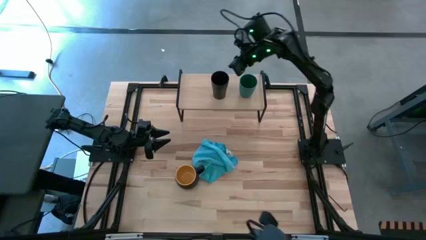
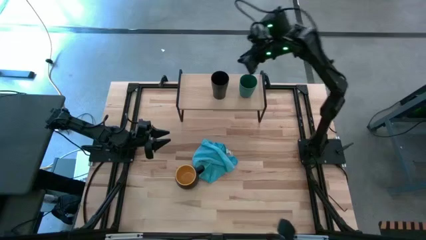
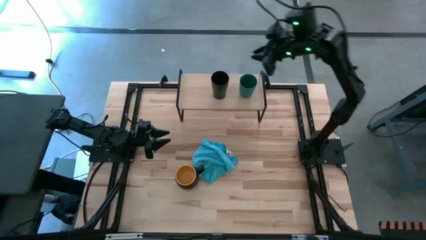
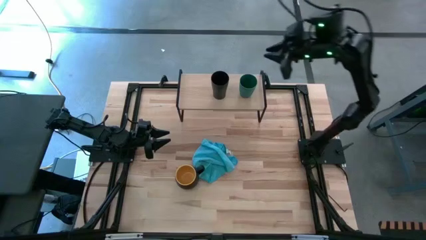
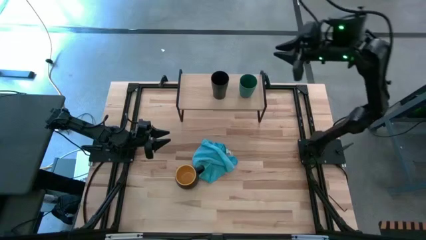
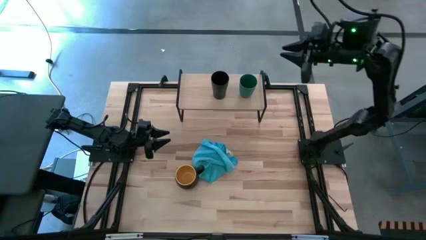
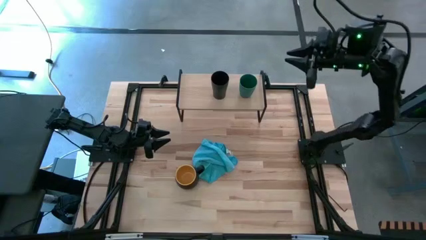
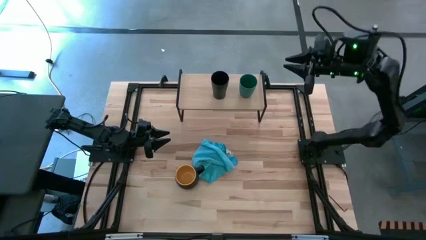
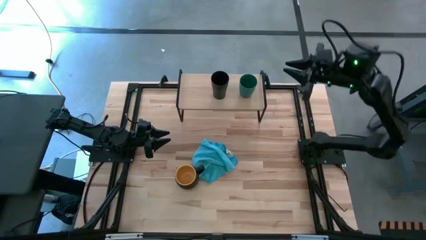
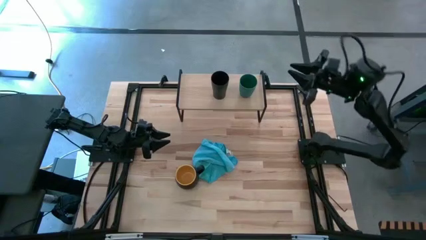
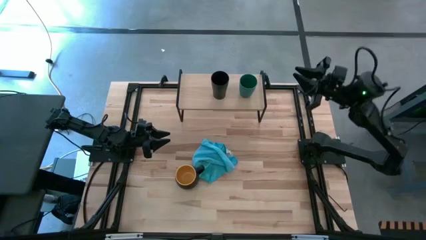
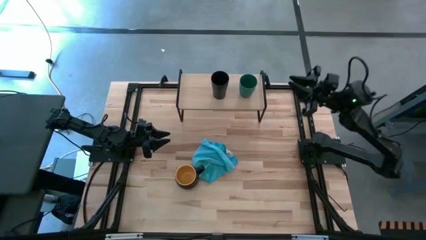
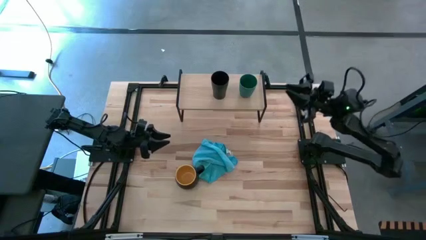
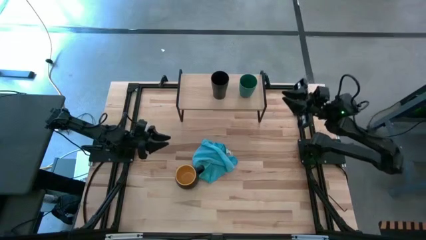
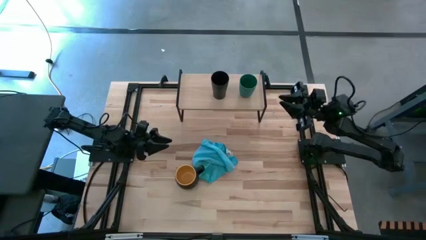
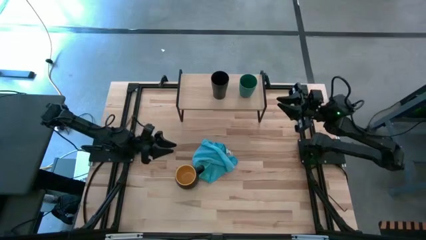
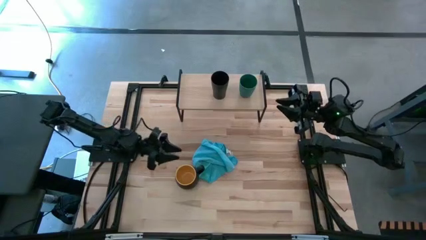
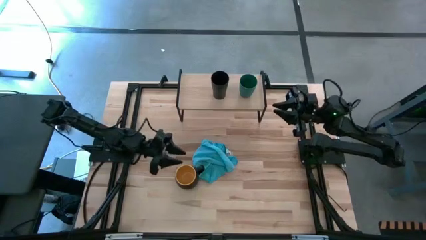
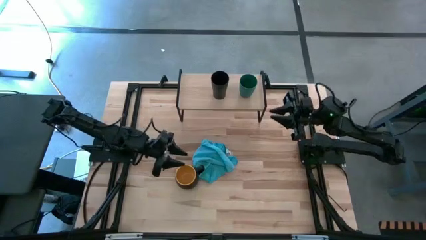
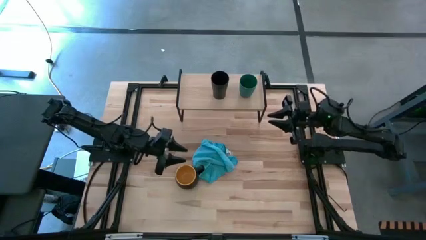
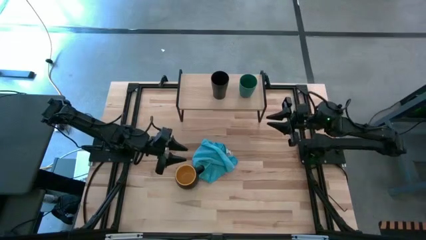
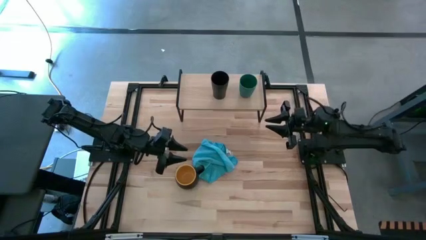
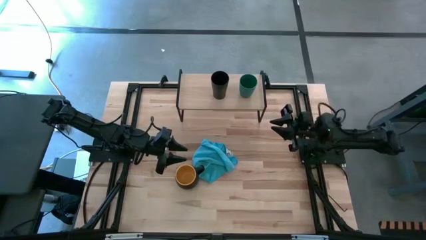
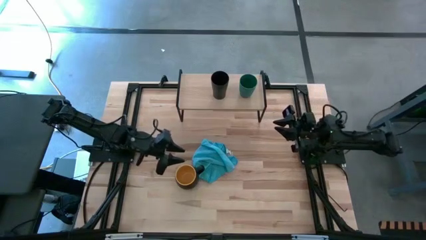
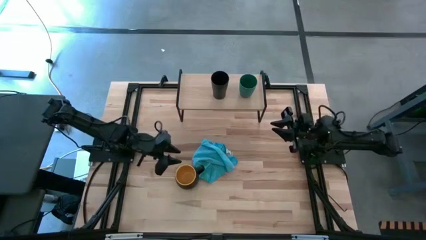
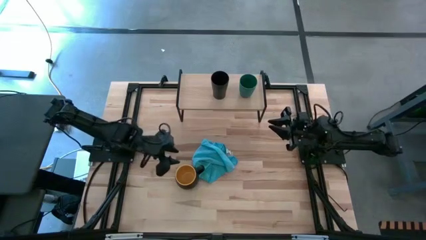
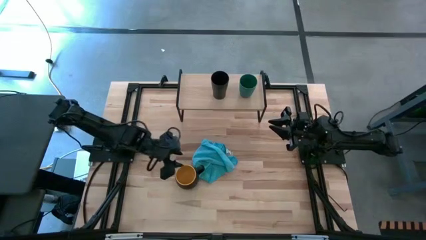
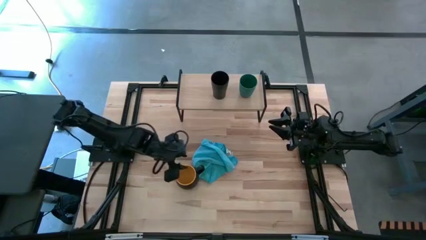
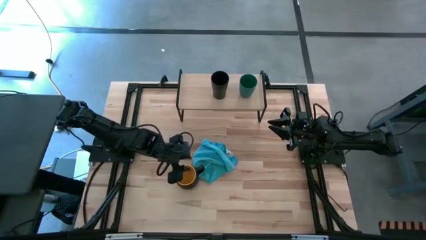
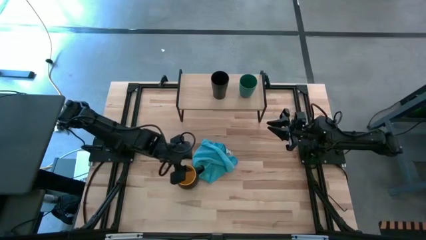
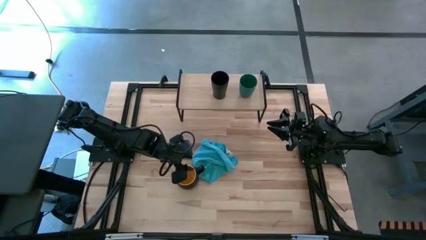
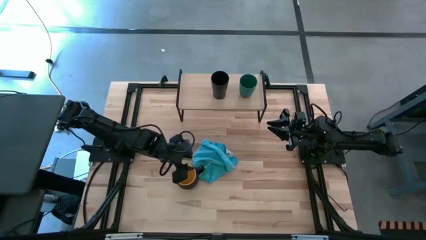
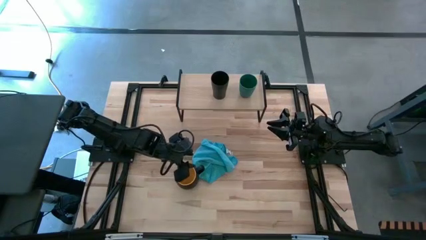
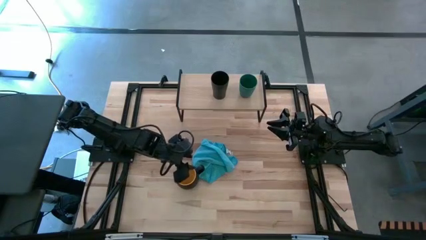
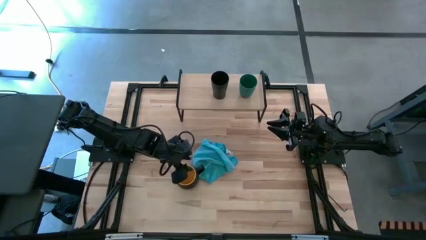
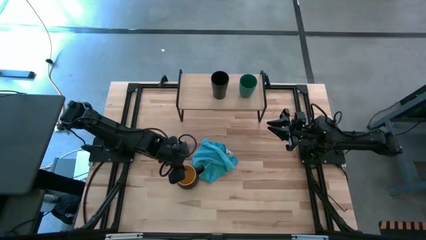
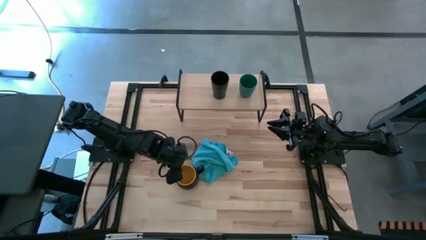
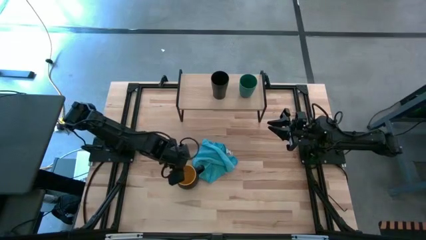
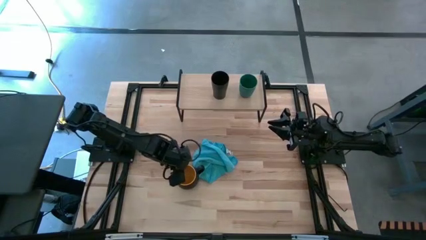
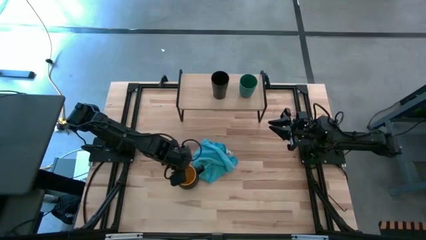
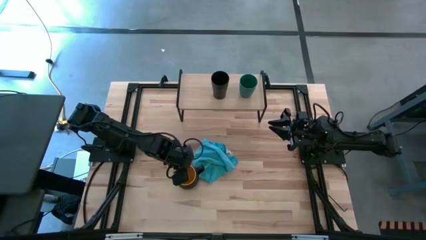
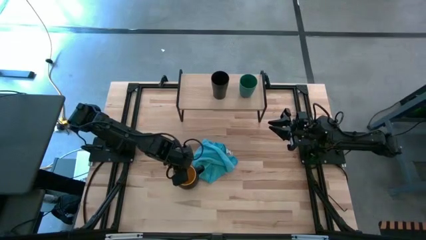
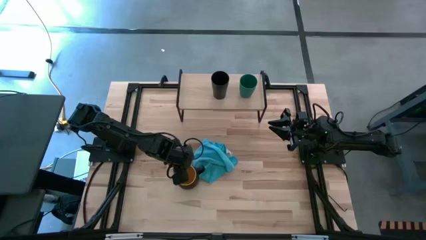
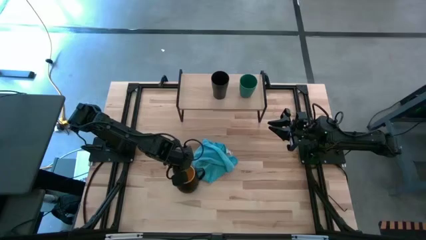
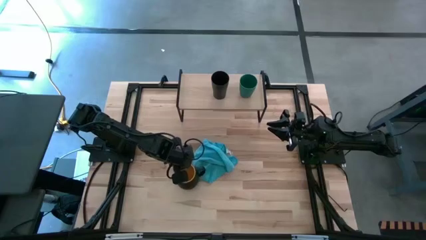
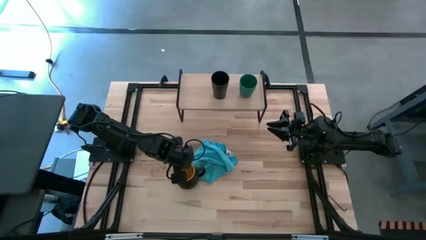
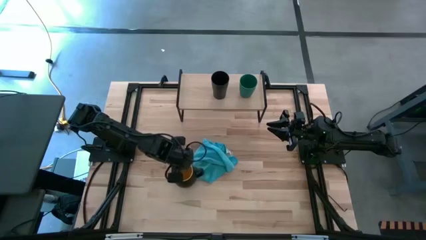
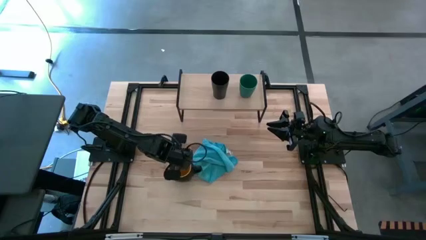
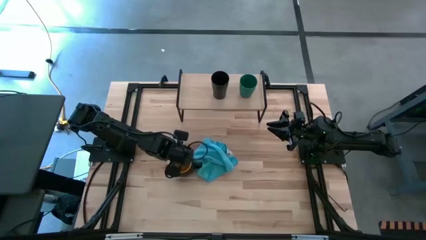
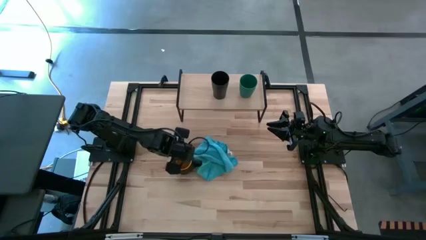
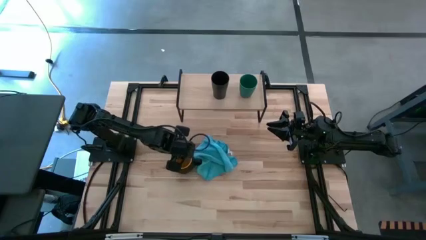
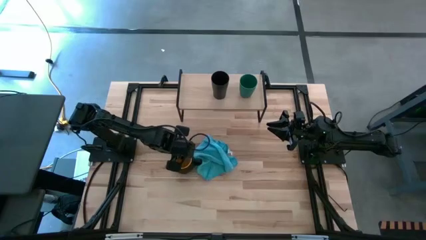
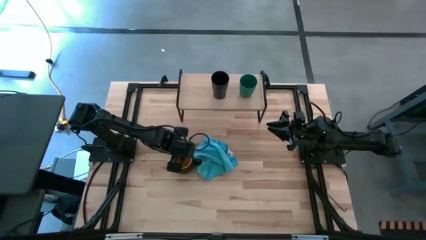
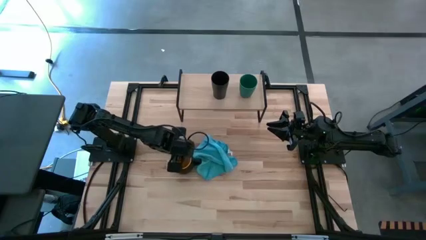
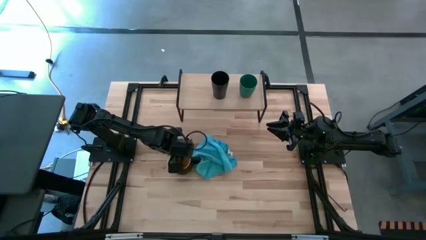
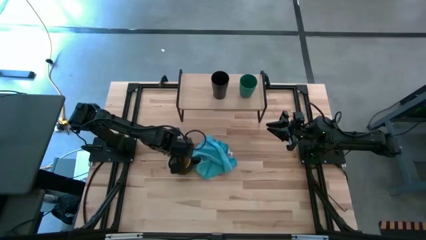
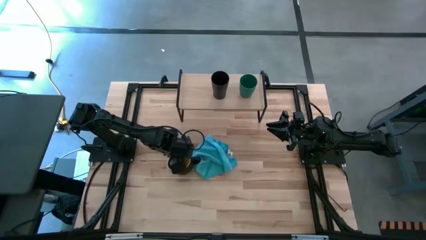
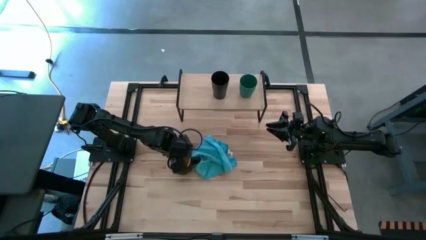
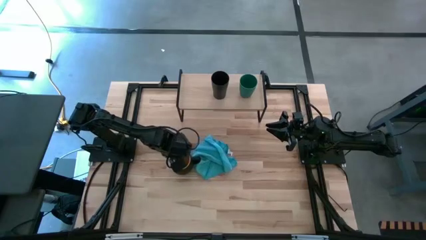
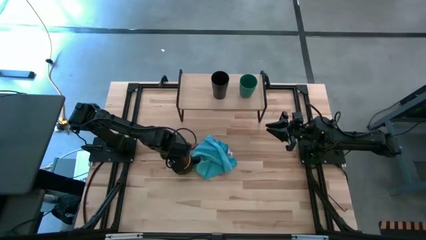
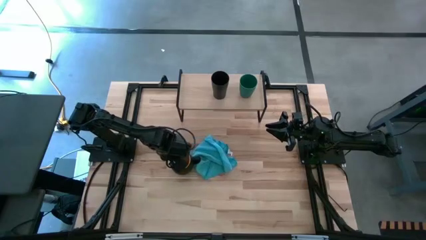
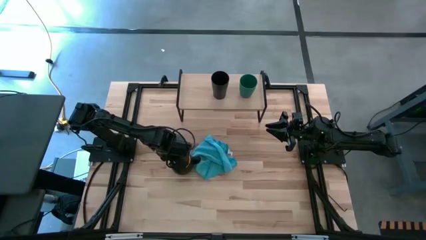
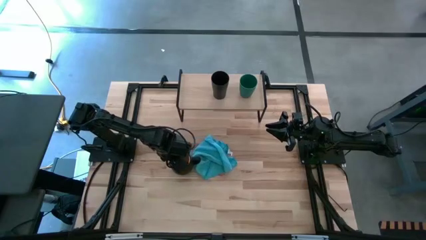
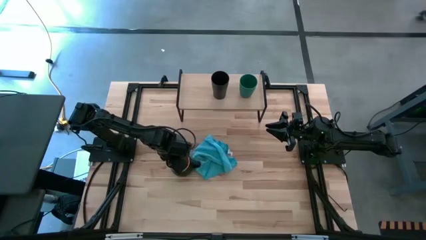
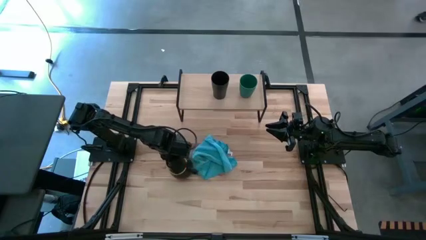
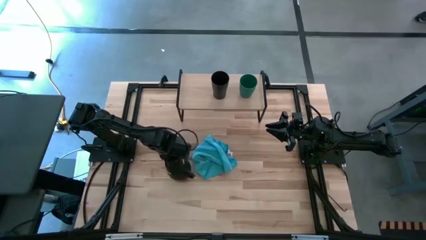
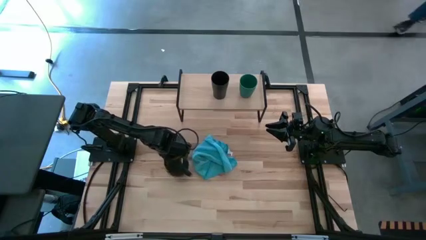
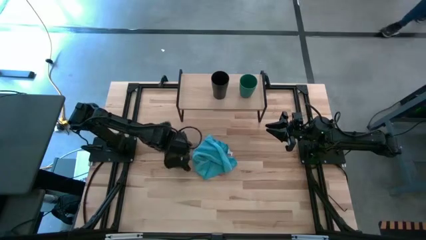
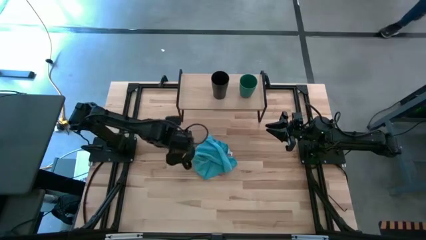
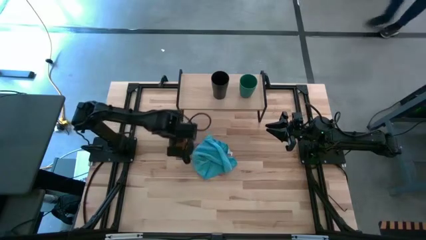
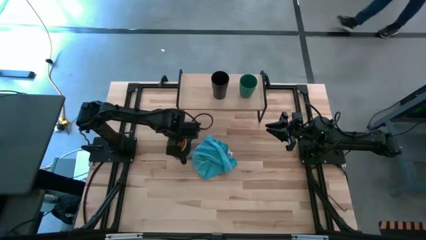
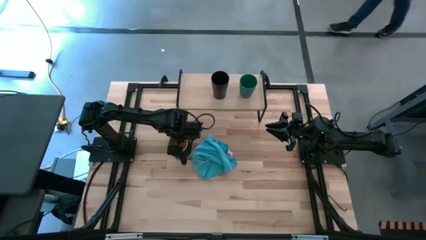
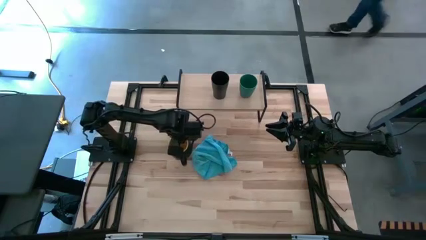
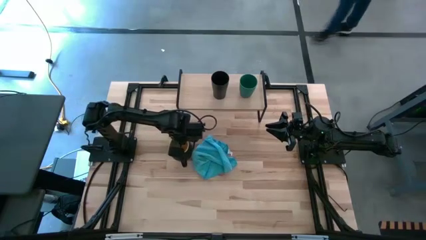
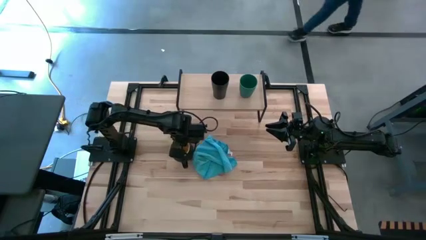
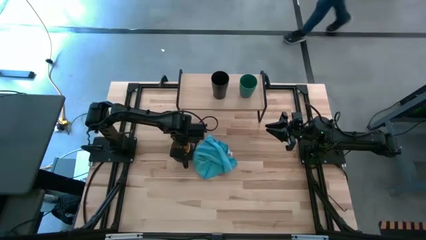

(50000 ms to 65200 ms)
Task: Stack small to large cups/mugs on shelf
Put the black mug on the shelf

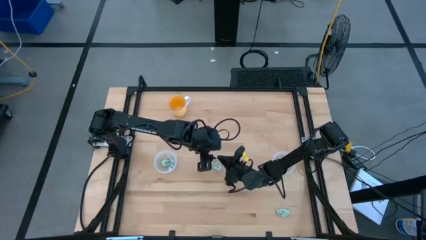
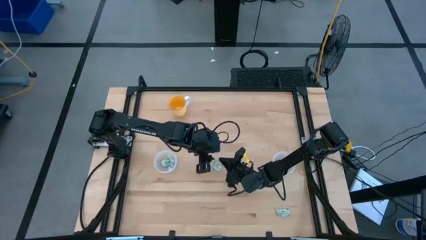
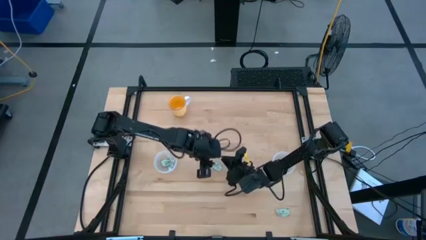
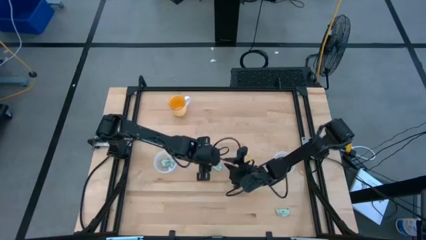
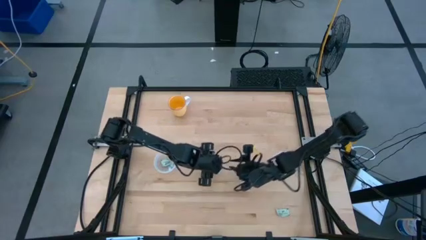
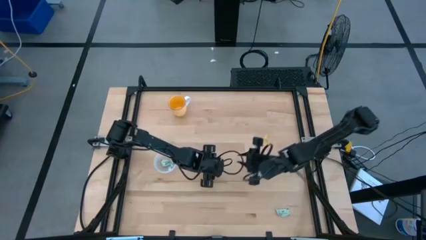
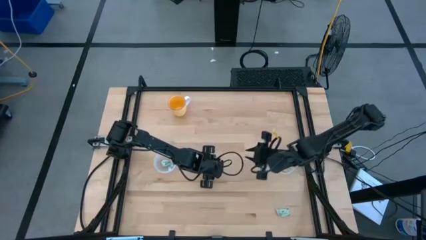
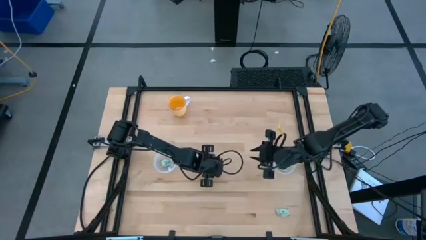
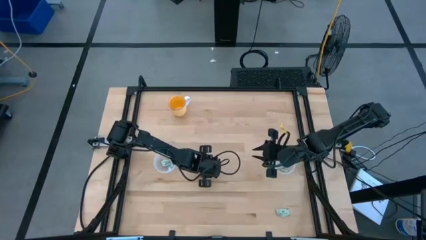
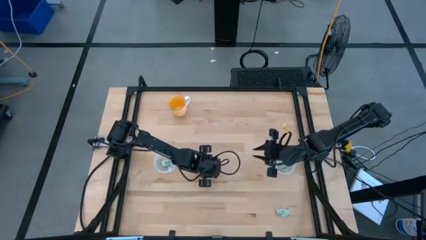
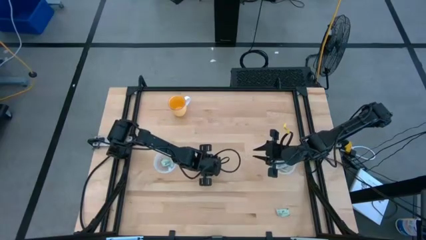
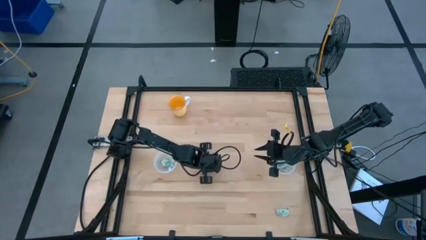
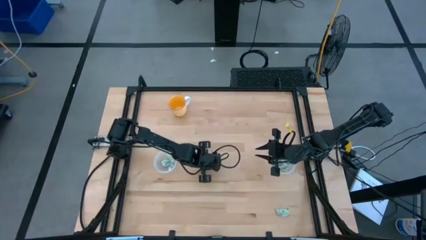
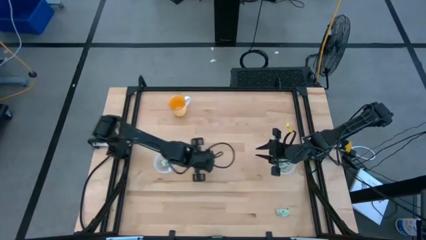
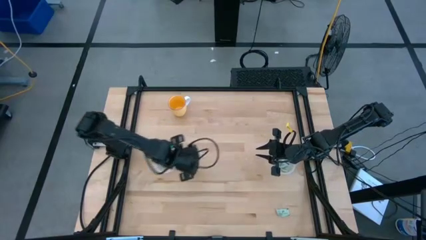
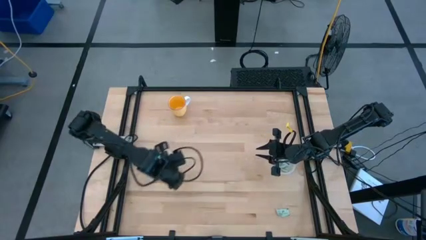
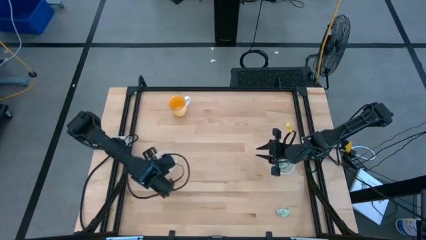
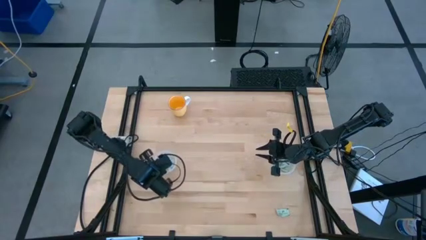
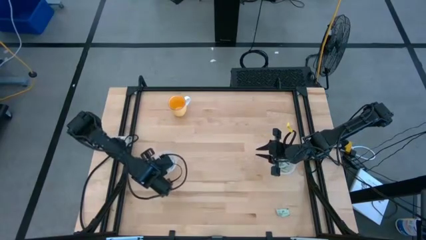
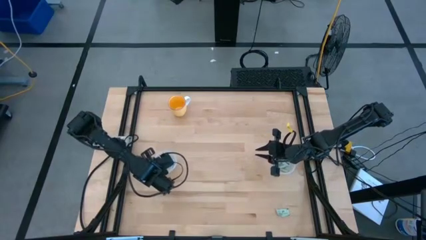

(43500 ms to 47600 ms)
Task: Pick and place items into bin
Put the stevia packet into the left transparent bin
